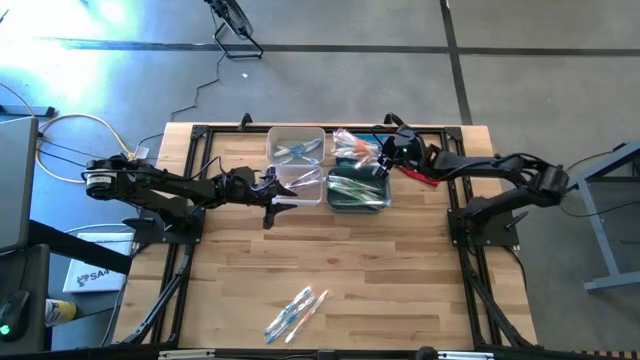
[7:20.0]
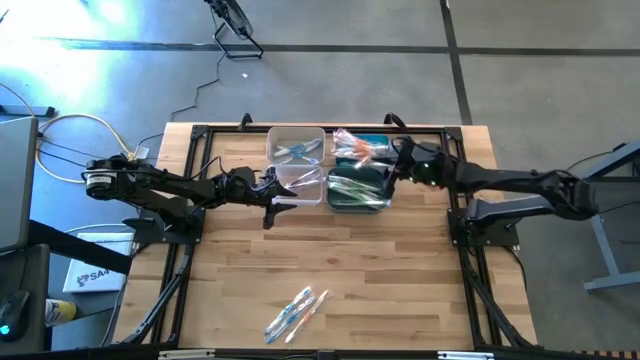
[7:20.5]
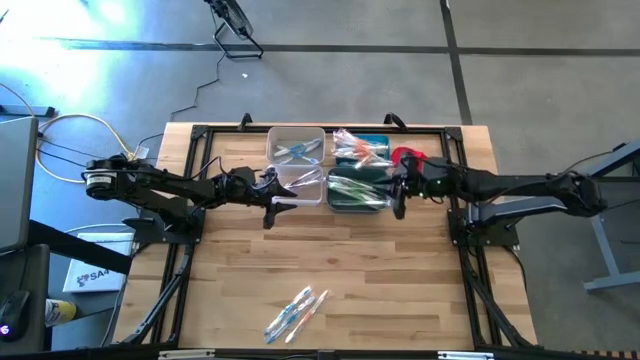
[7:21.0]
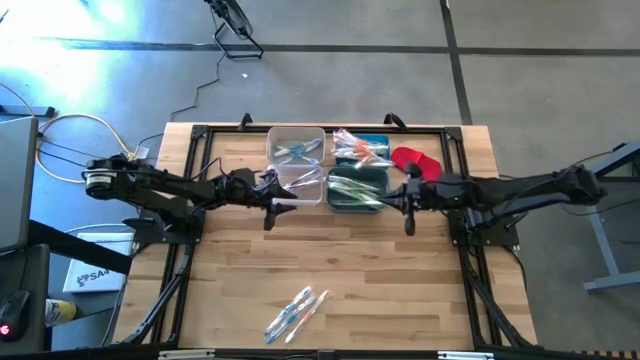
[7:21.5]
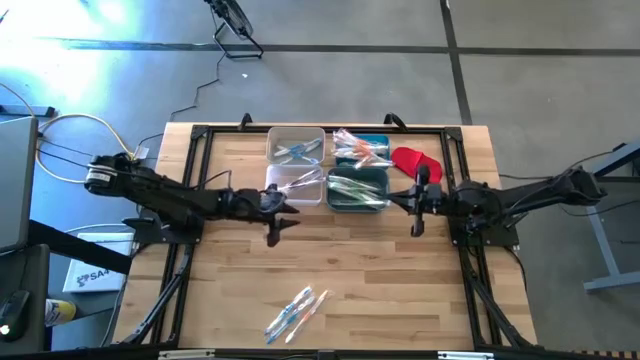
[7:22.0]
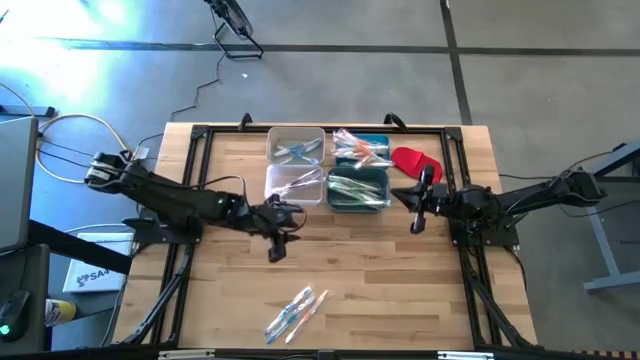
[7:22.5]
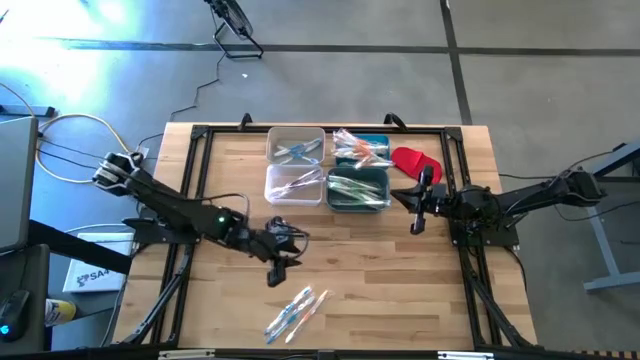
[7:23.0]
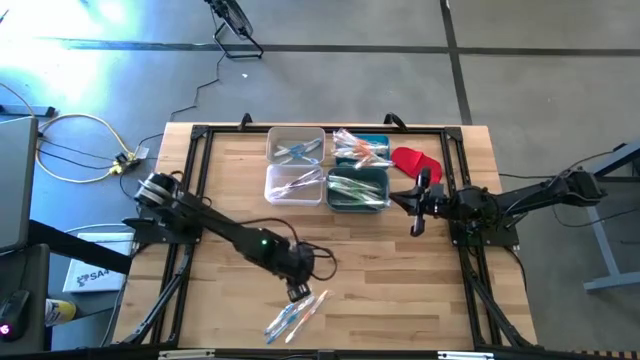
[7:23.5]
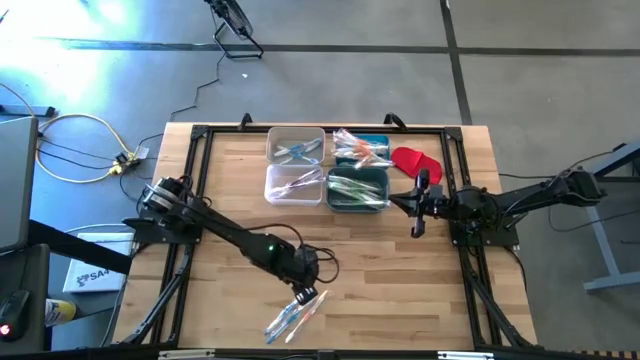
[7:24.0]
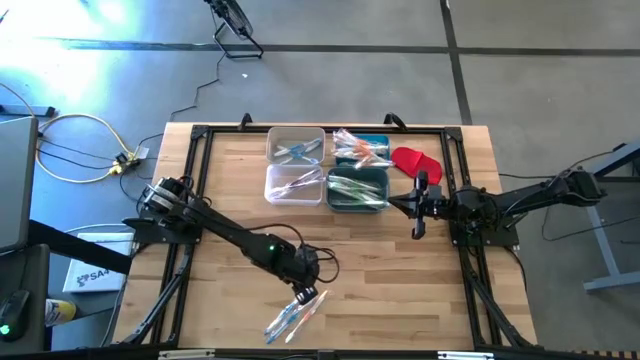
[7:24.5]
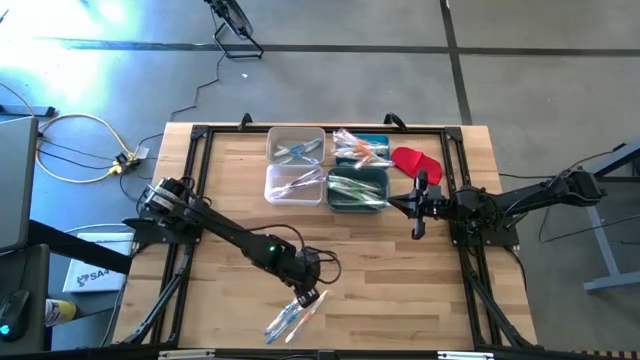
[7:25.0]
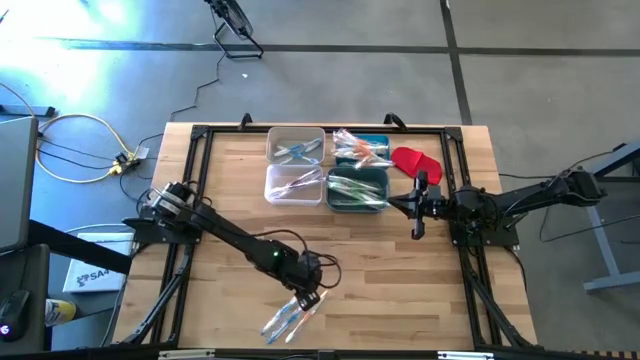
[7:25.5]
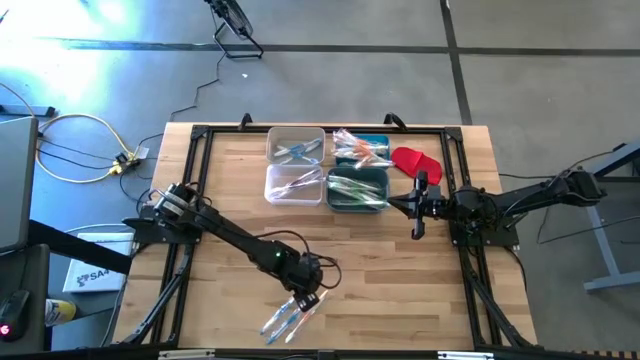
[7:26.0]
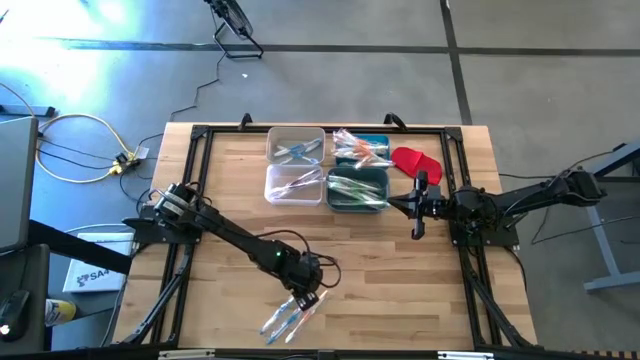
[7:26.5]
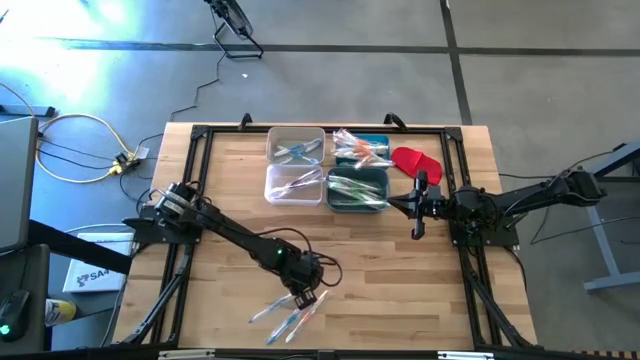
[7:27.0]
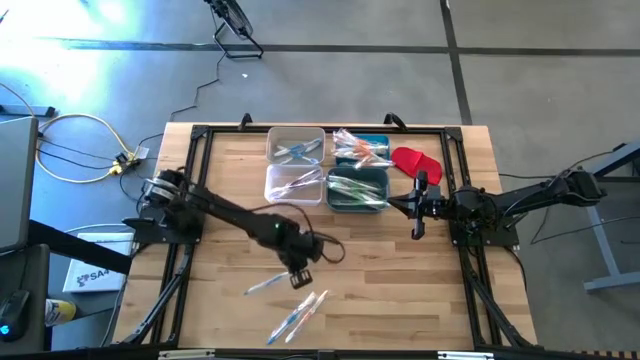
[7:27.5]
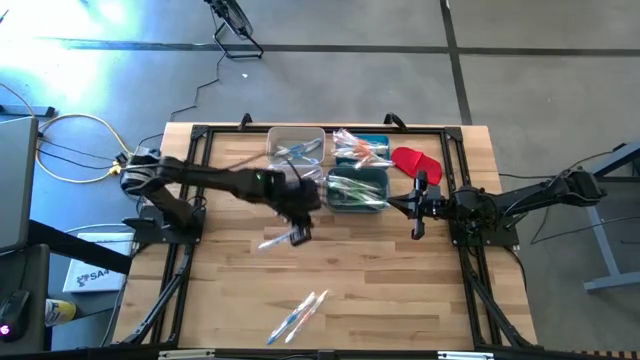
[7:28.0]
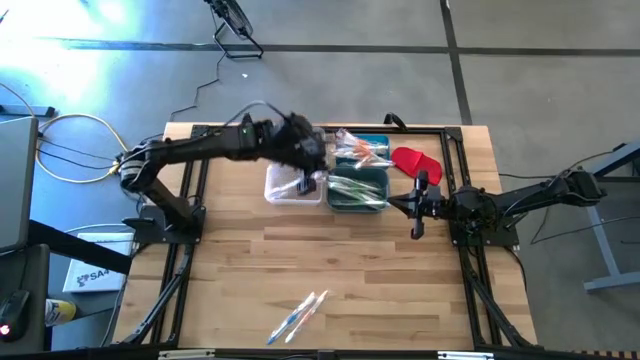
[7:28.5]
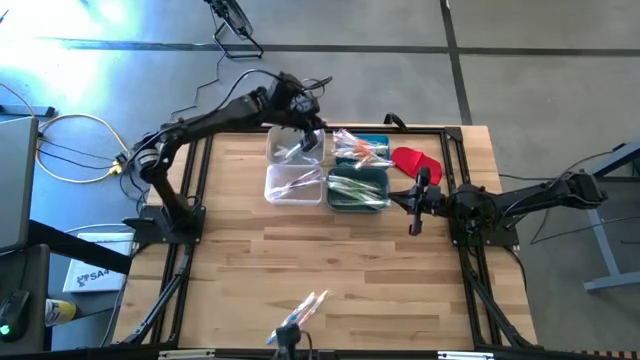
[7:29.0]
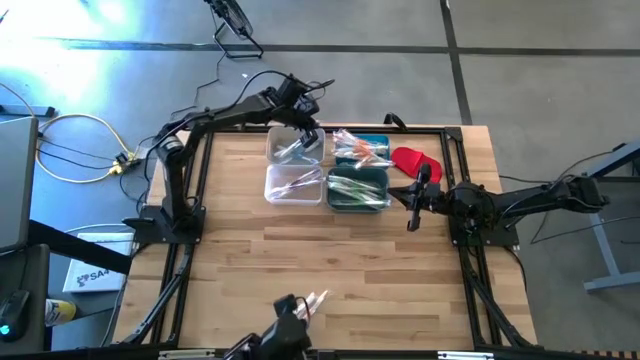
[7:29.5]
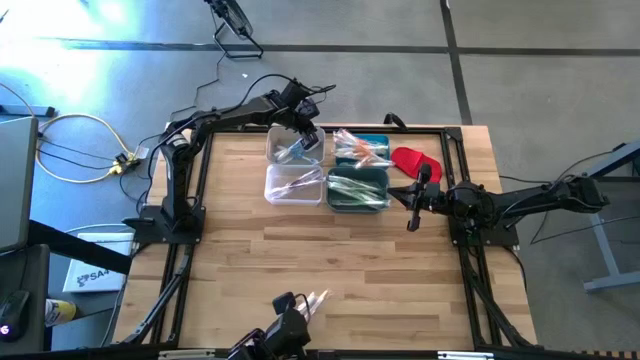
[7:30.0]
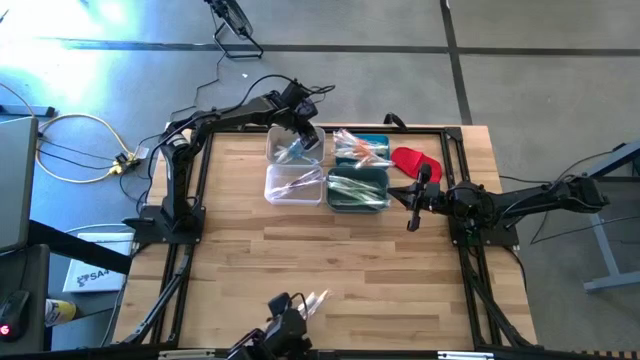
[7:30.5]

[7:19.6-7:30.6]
Task: Pick & Place Toothbrushes
Put the blue toothbrush into the white bin

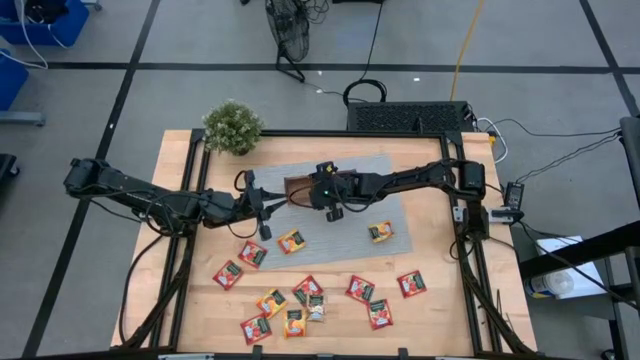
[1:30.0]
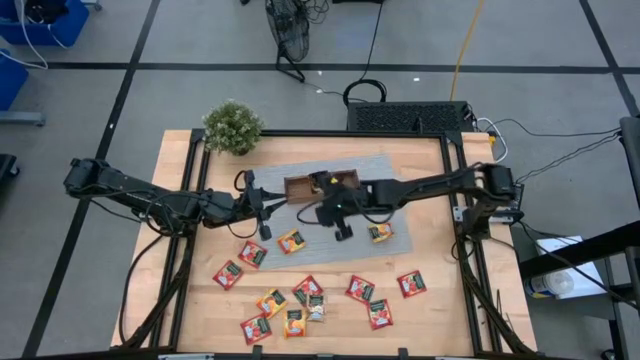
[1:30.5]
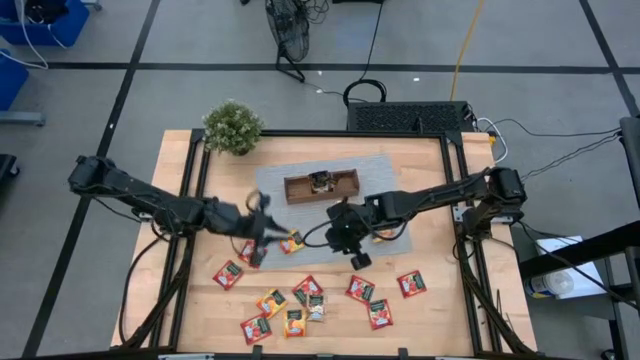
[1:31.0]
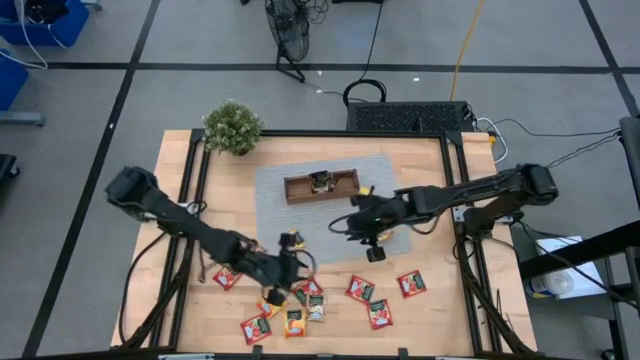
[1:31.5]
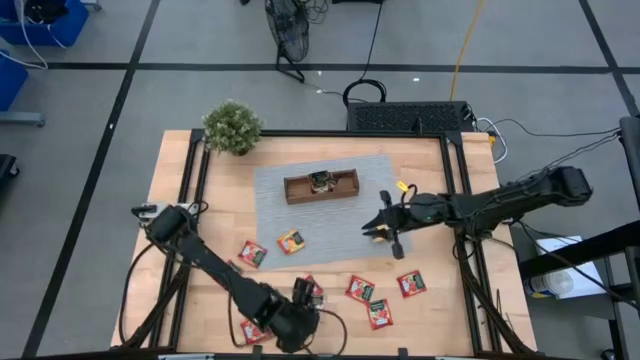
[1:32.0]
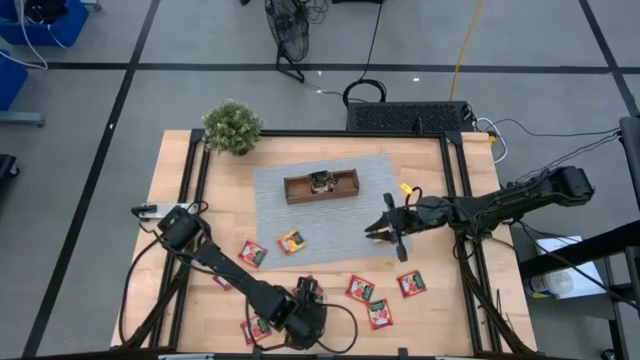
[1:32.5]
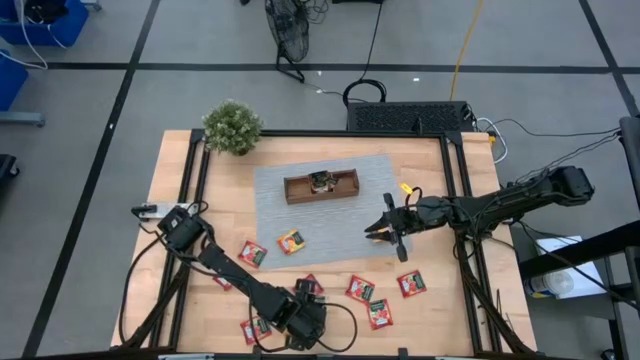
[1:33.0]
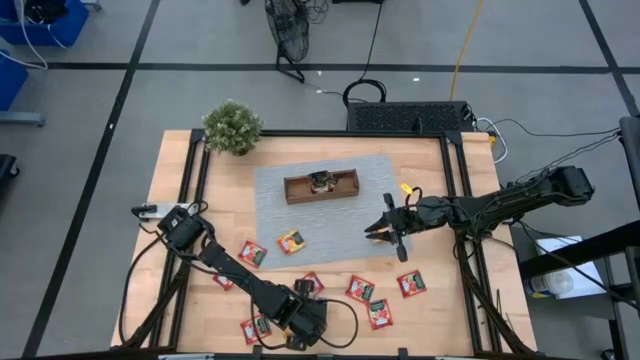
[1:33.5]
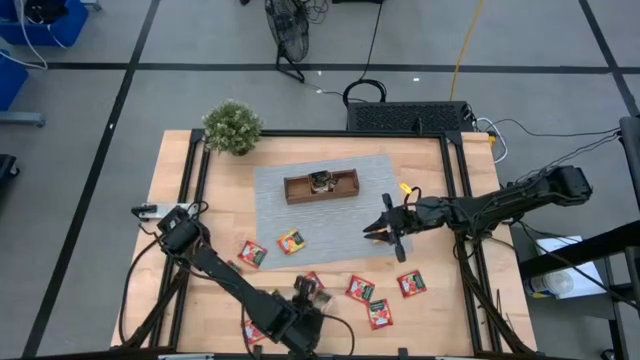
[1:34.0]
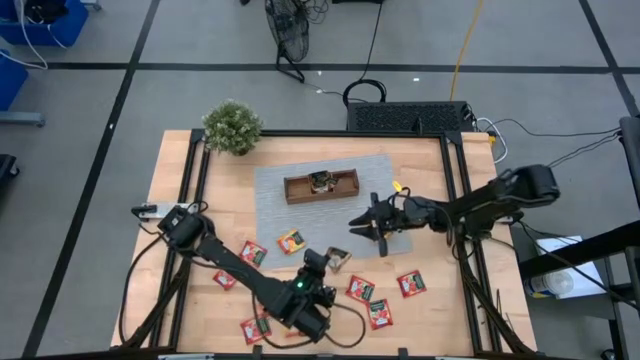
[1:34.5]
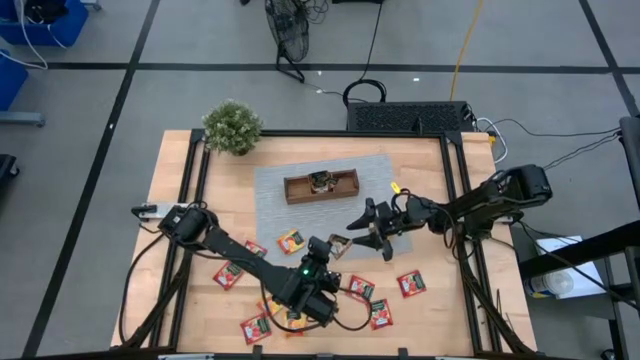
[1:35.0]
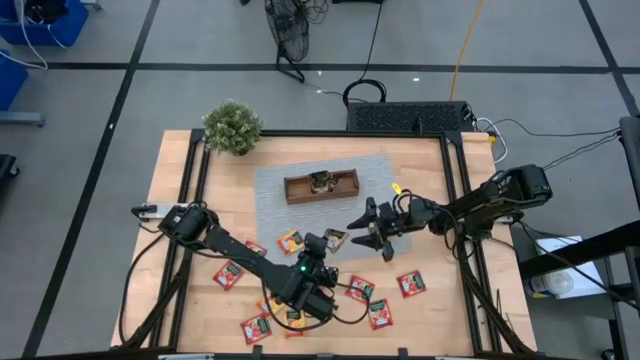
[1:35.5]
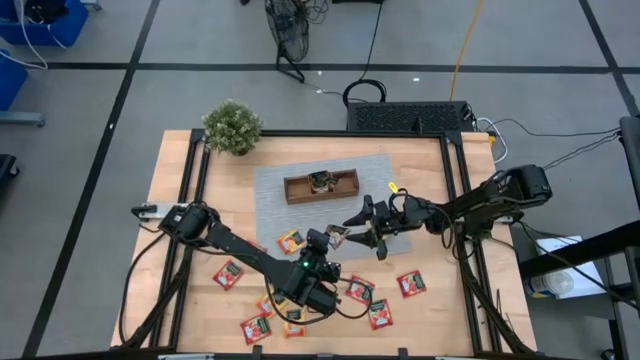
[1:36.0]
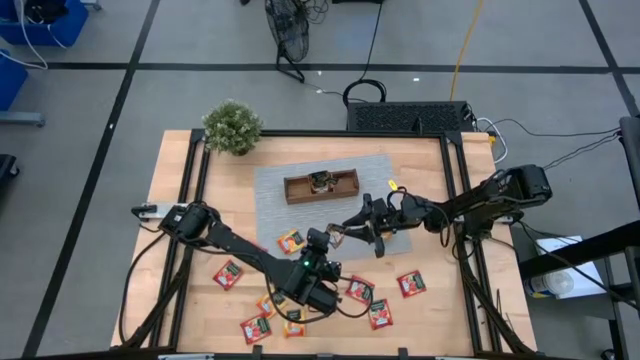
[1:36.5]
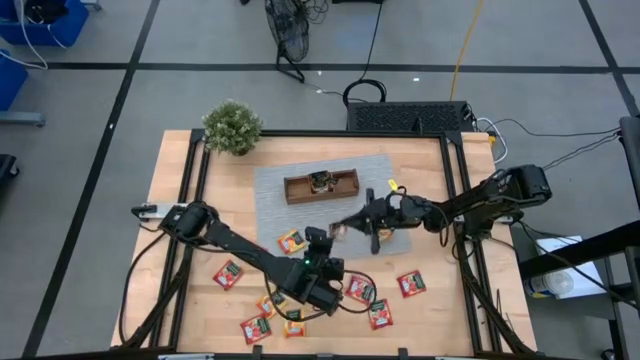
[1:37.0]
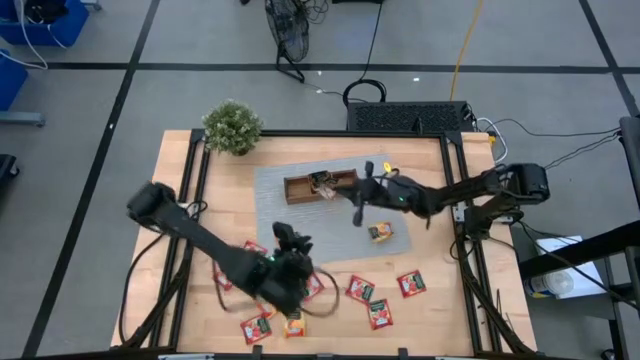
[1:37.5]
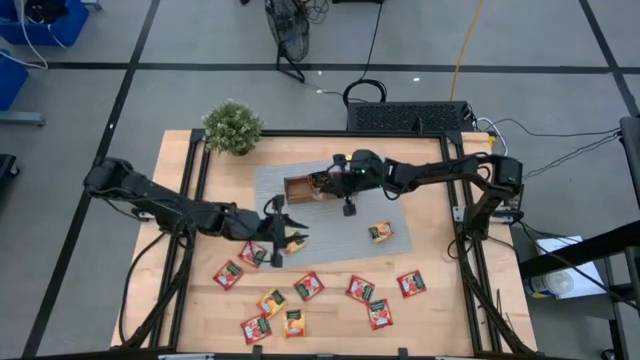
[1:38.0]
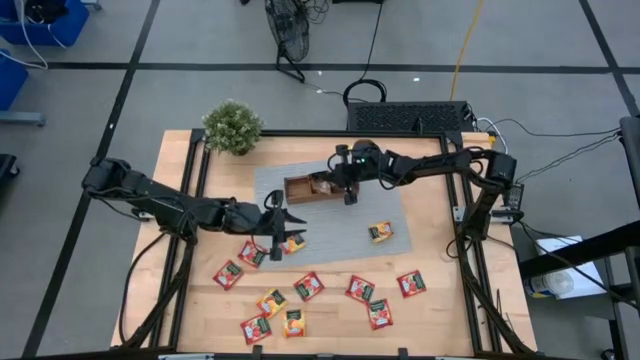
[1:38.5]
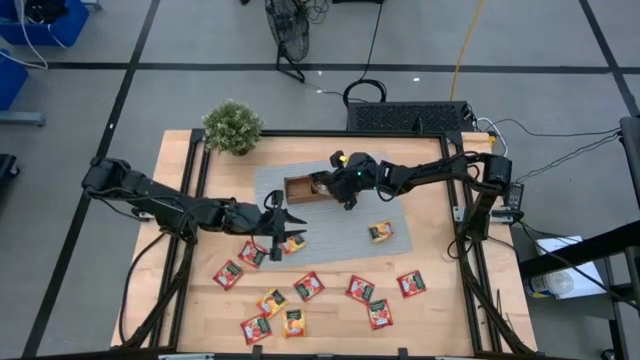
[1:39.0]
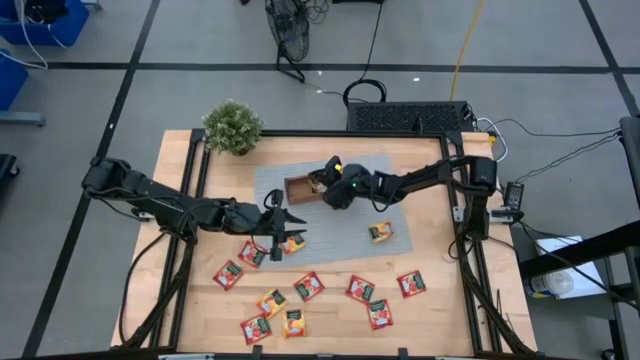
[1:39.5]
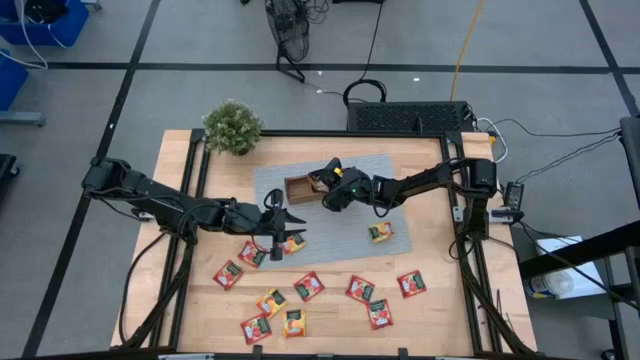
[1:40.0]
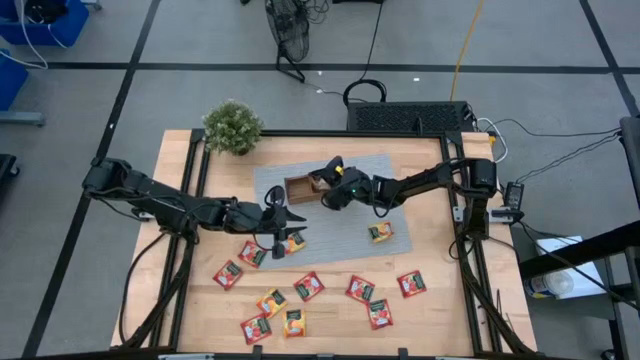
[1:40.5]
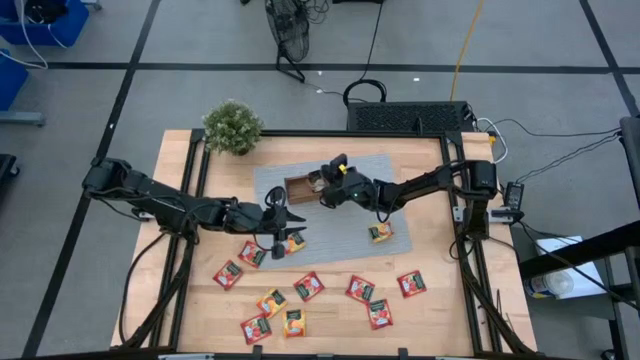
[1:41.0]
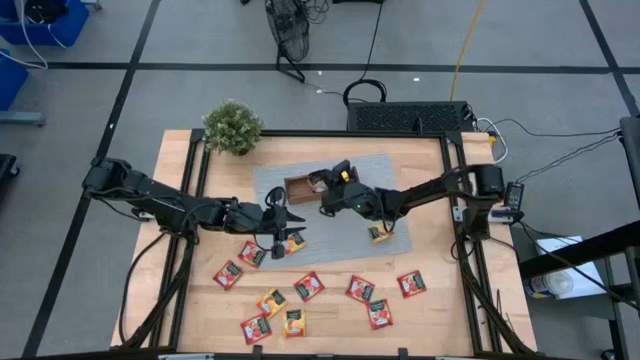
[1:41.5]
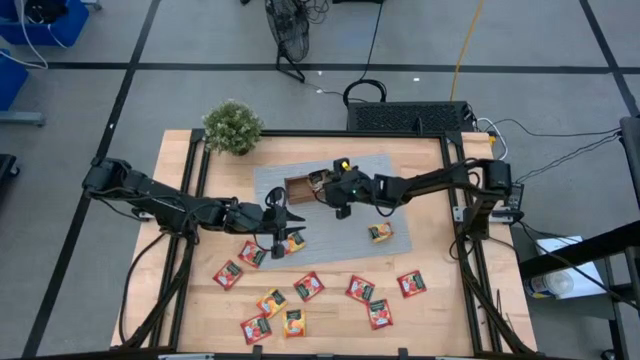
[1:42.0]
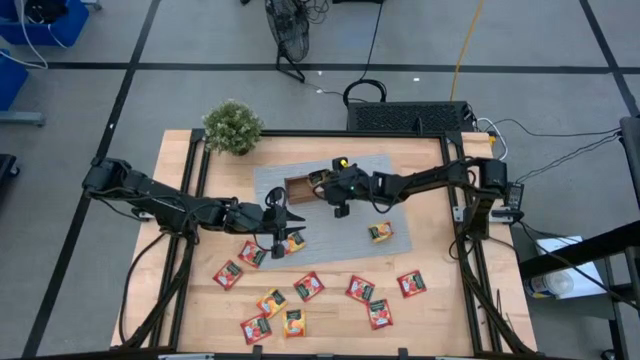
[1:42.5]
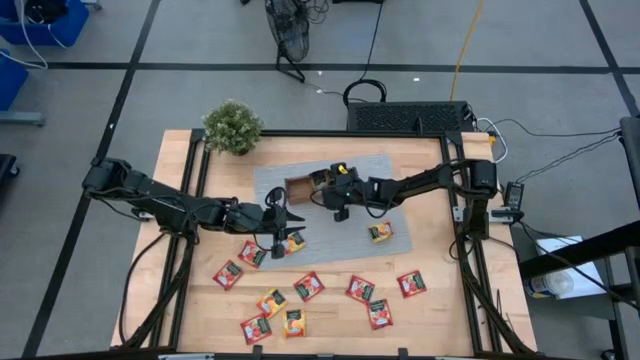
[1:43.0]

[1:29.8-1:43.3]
Task: Pick & Place Tea
Put the brown tea bag into the middle section of the wooden organizer
